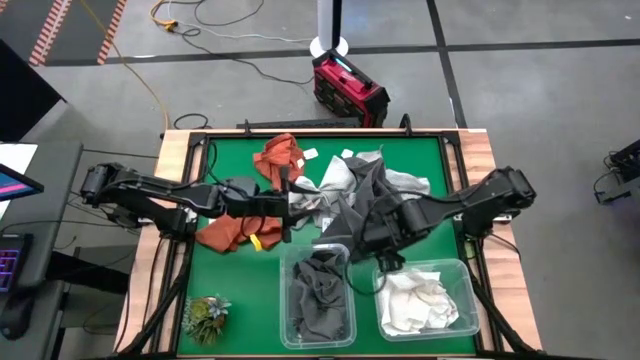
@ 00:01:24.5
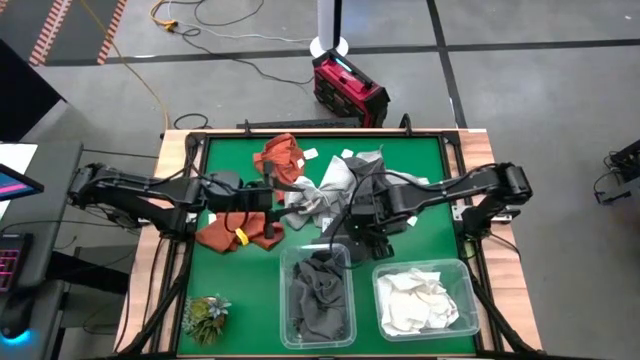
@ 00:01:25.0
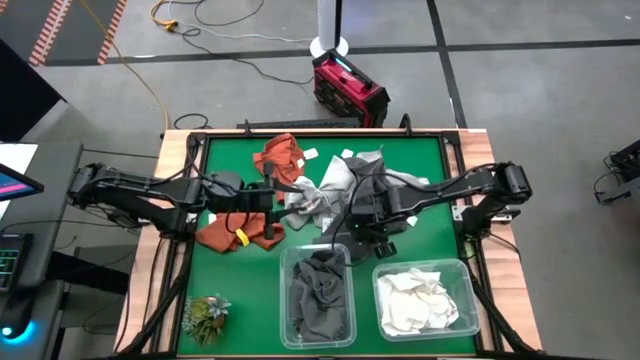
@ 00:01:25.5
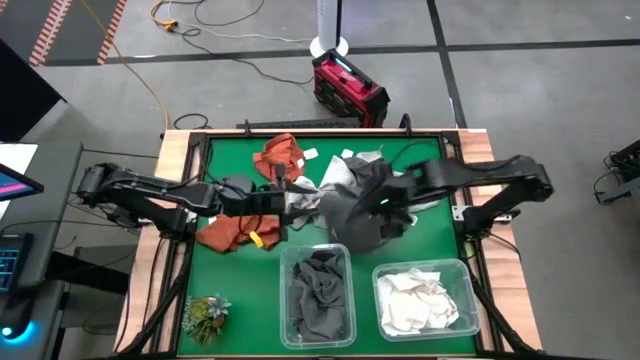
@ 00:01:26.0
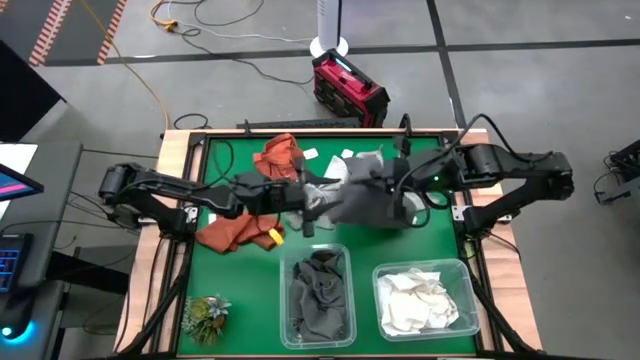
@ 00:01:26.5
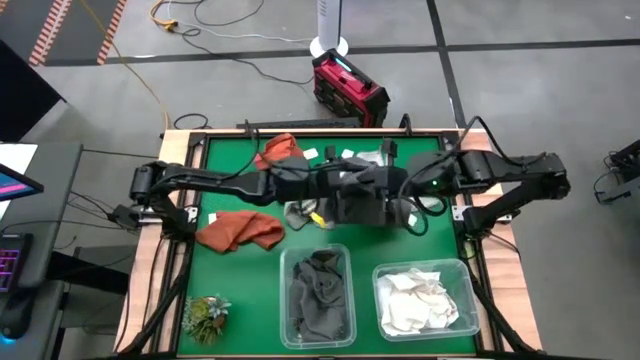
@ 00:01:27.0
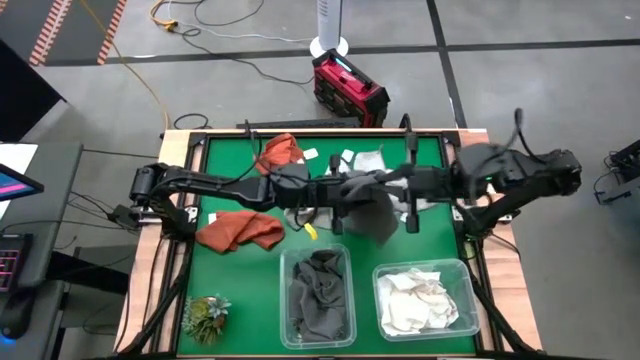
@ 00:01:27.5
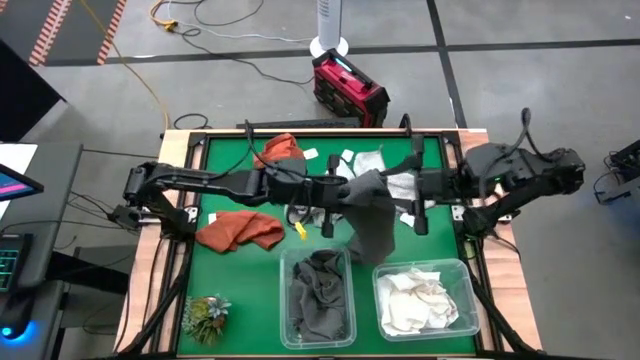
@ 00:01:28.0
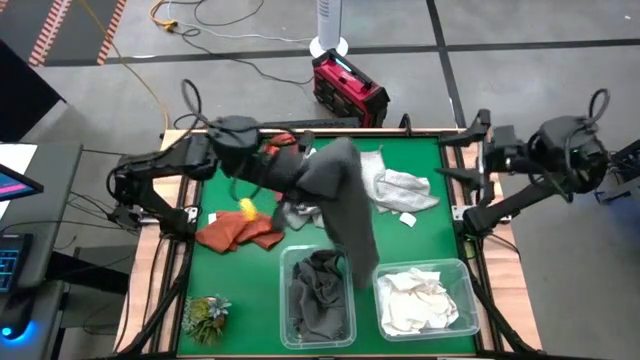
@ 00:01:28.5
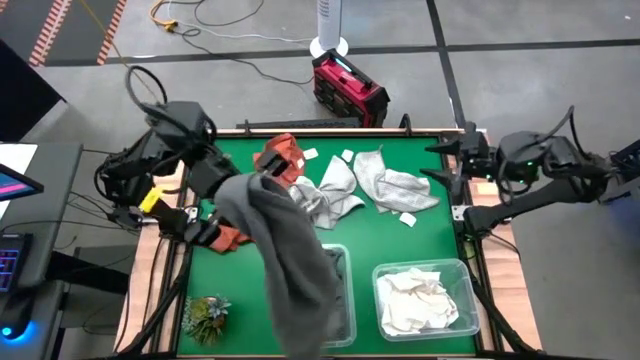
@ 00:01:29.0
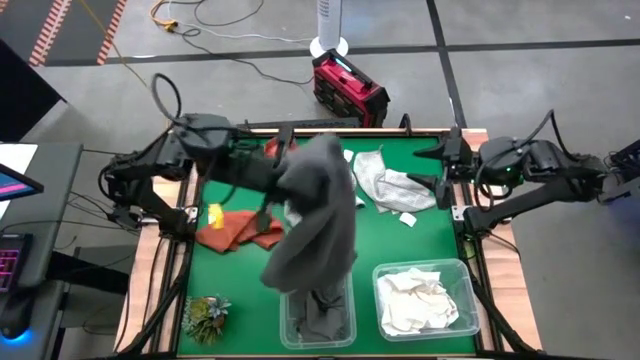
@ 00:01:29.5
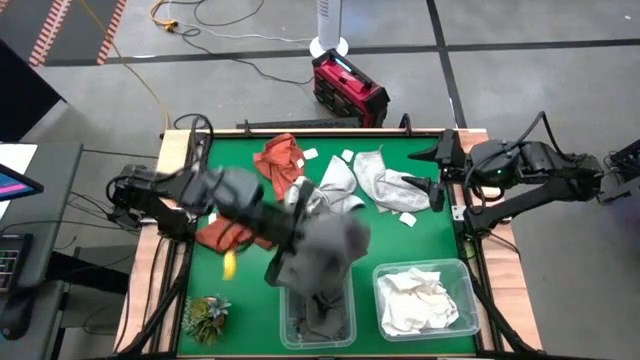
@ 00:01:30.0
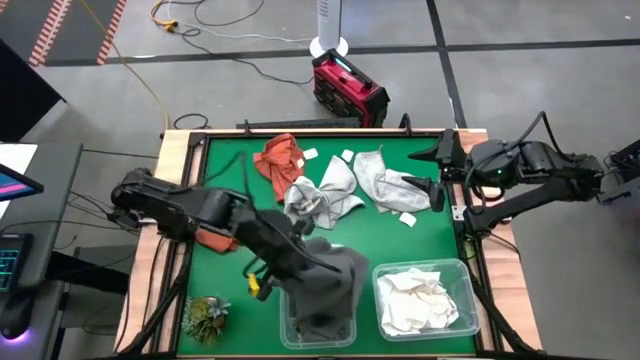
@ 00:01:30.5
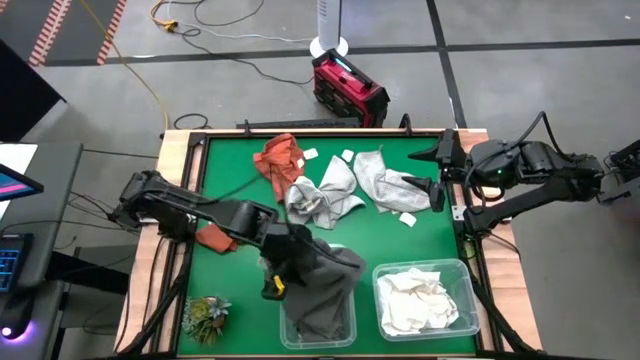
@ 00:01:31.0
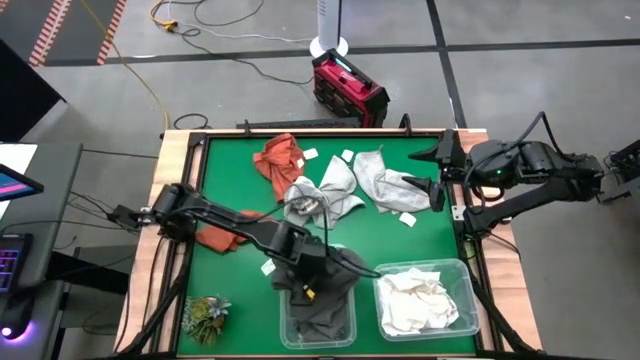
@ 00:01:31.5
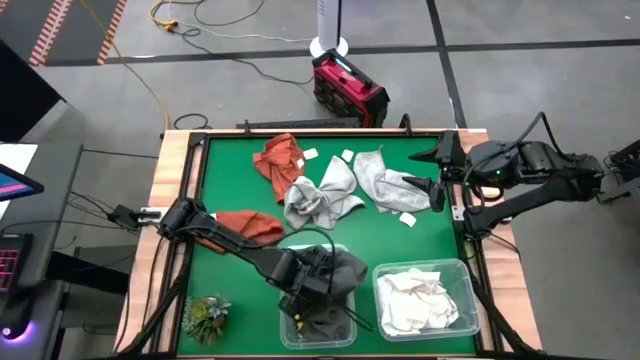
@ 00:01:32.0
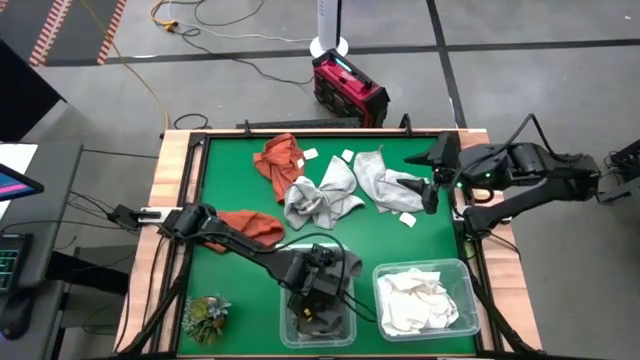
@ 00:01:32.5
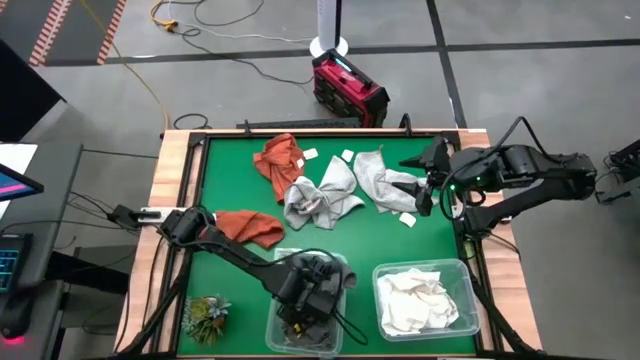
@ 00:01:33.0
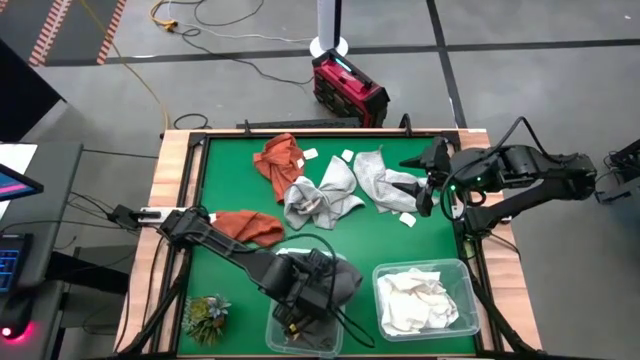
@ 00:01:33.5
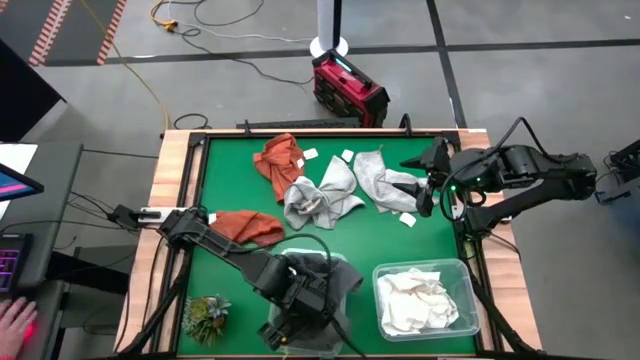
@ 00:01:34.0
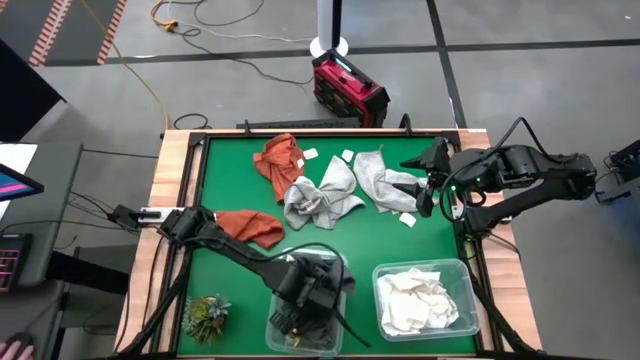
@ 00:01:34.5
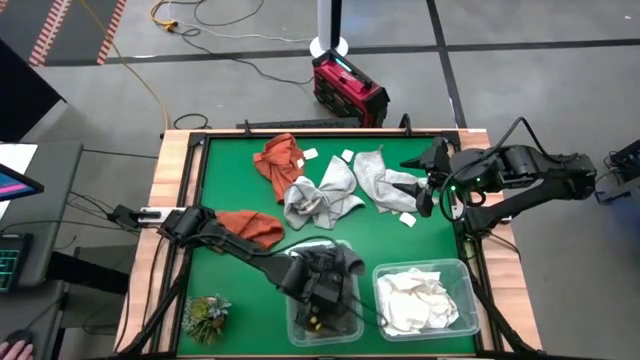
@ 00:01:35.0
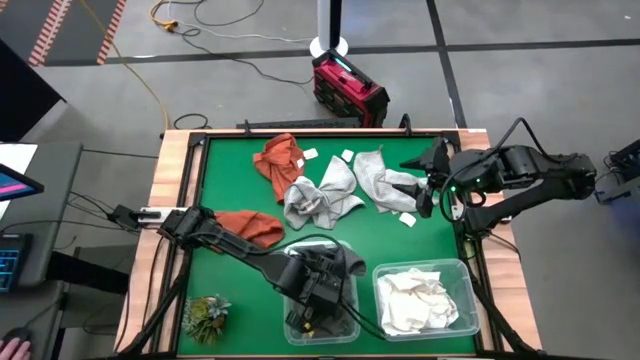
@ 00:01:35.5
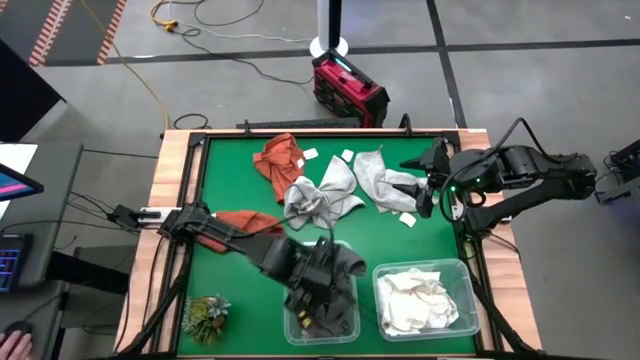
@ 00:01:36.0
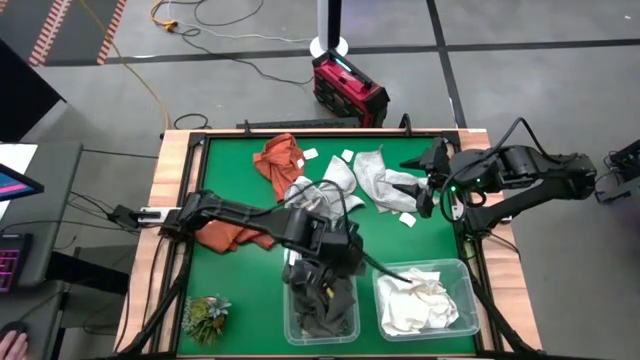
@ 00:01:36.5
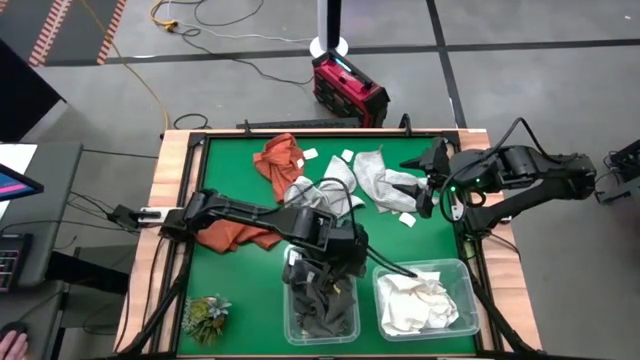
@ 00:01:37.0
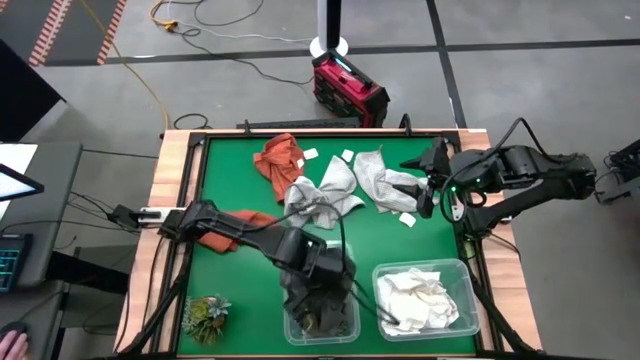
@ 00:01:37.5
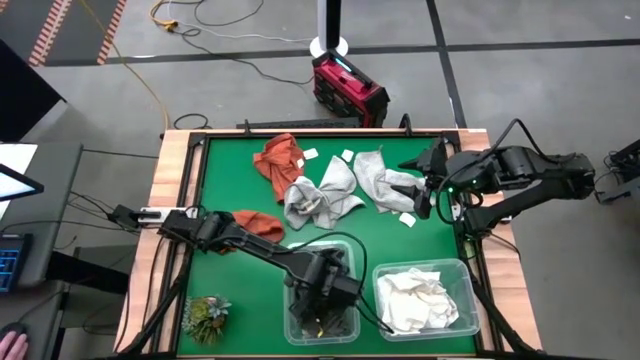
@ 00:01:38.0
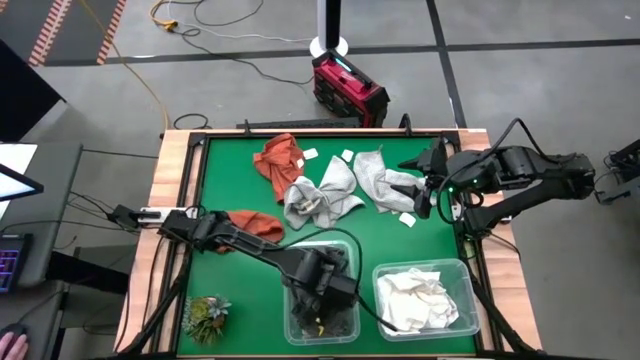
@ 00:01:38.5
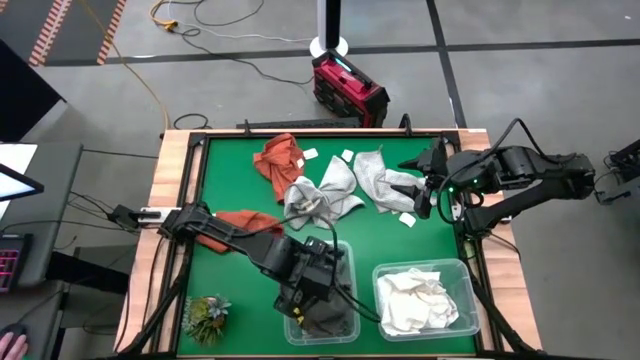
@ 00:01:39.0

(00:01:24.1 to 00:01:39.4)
Task: Sort towels by color in basket
Put the dark grey towel into the left transparent bin

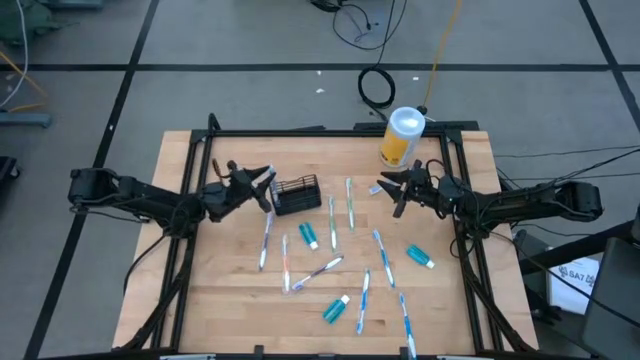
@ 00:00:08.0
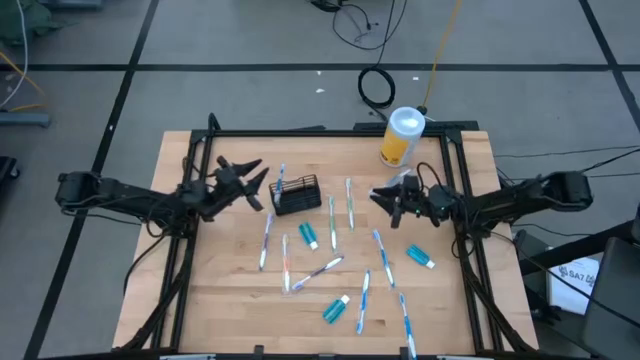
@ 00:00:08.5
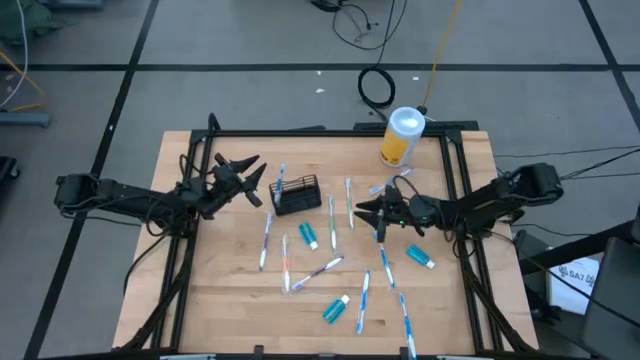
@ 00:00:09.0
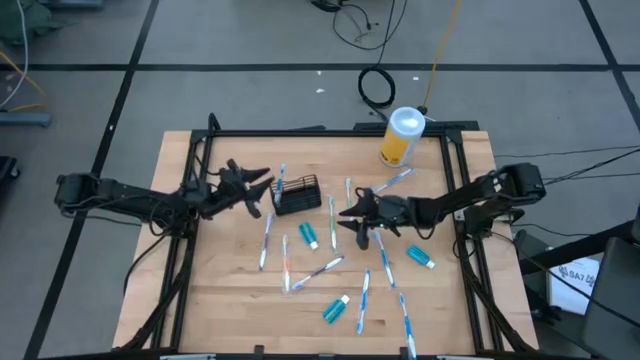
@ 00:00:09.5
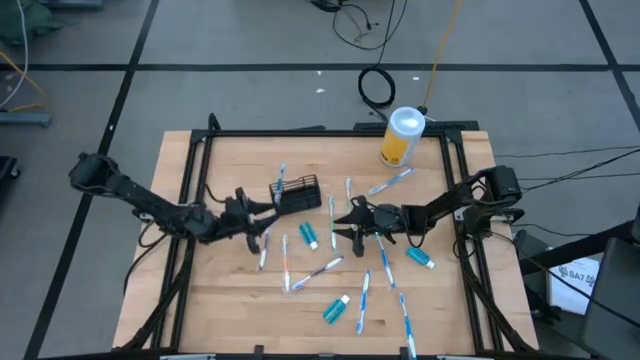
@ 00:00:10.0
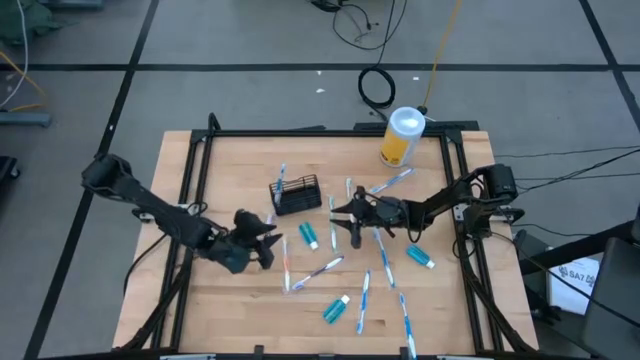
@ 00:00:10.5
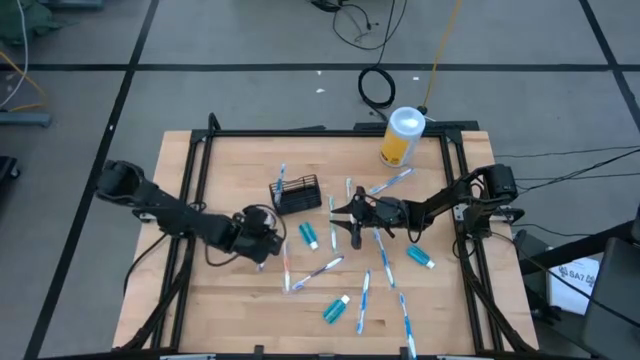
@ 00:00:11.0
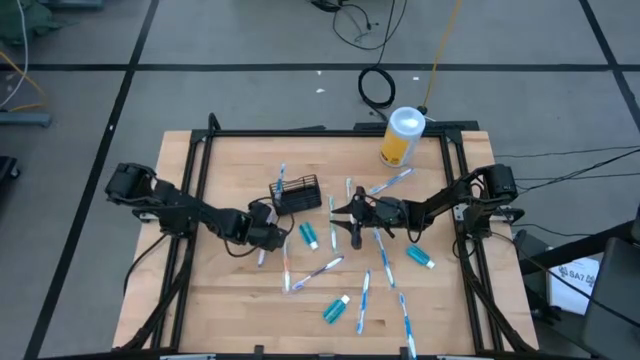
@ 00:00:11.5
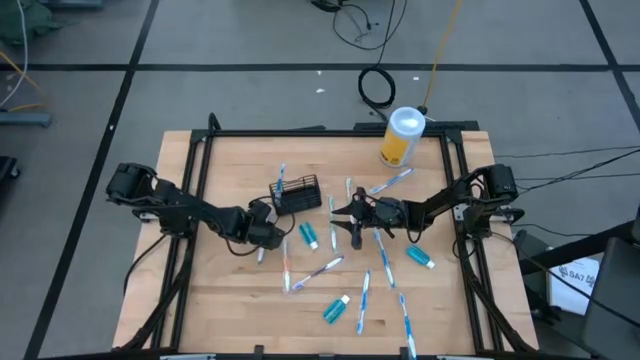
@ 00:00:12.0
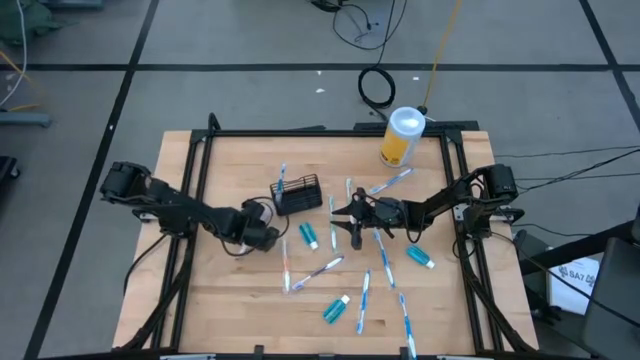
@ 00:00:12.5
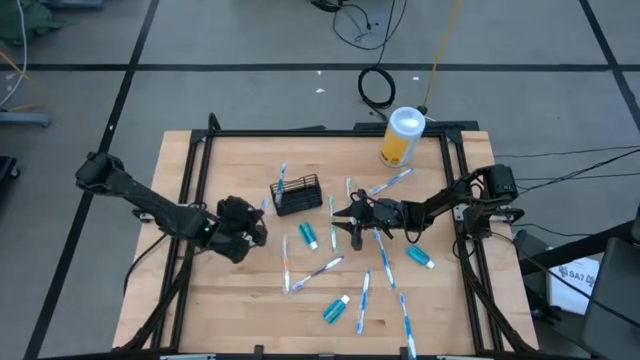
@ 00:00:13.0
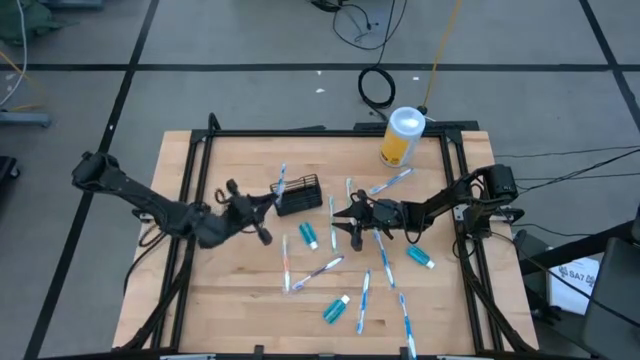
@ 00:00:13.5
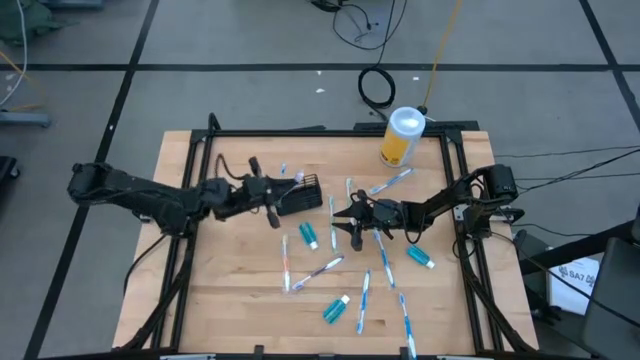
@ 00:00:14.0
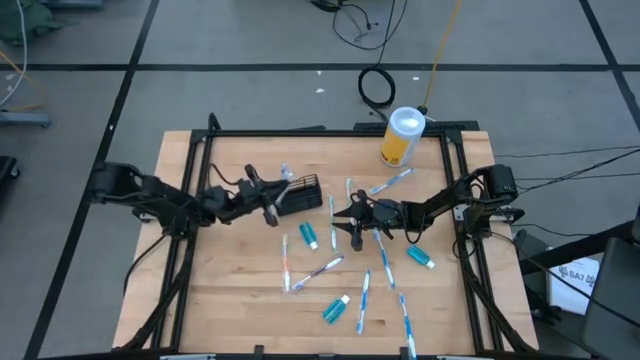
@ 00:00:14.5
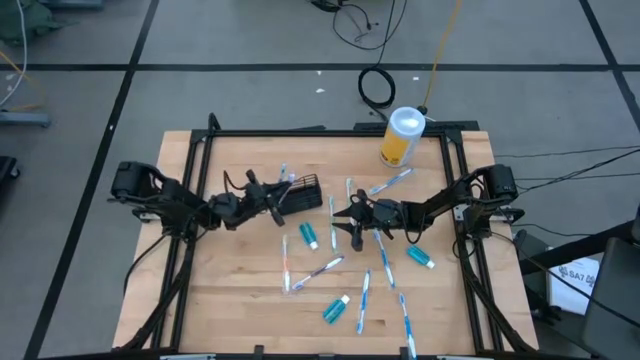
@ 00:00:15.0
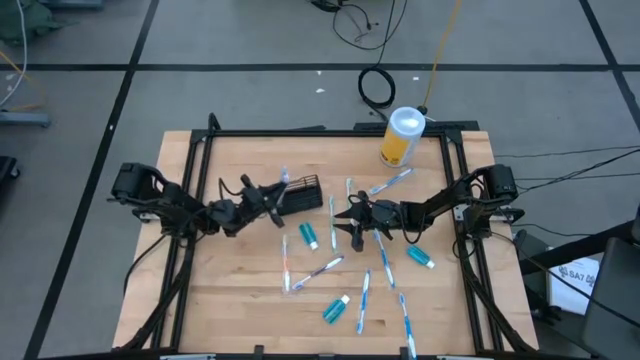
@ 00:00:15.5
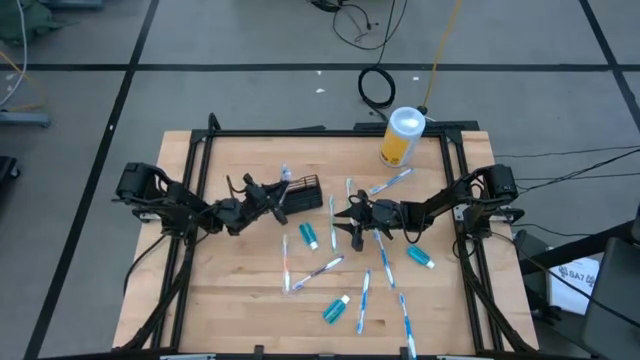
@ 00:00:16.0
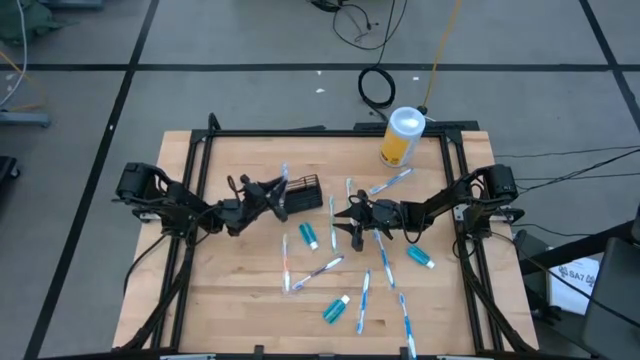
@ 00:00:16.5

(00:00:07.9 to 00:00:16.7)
Task: Pick & Place toothbrushing station
Put the violet toothbrush into the black mesh organizer
